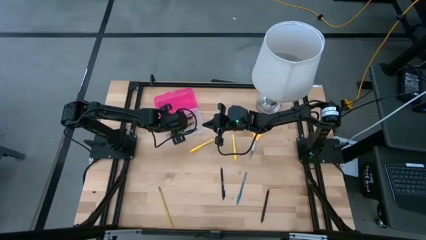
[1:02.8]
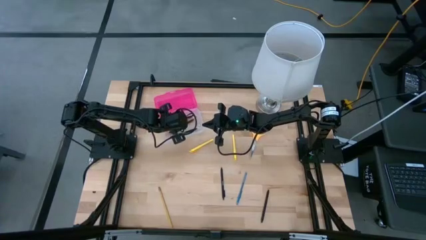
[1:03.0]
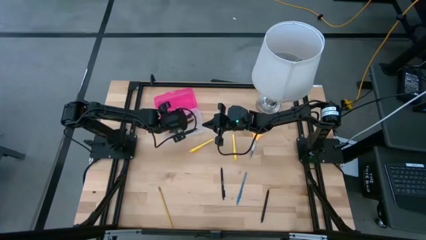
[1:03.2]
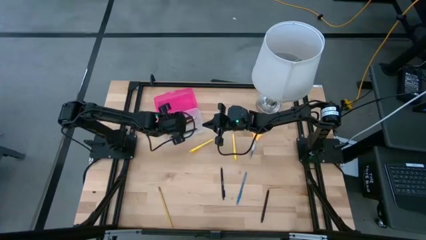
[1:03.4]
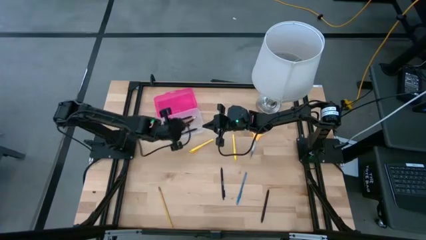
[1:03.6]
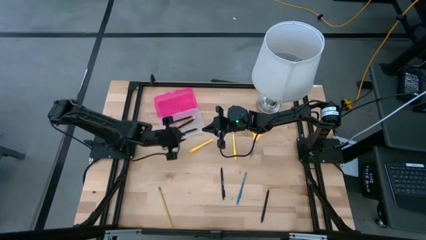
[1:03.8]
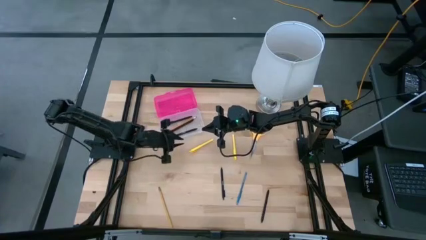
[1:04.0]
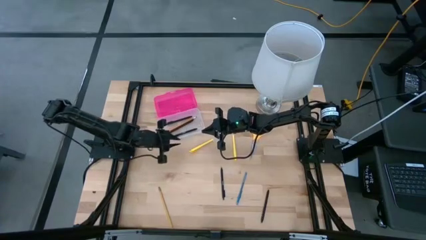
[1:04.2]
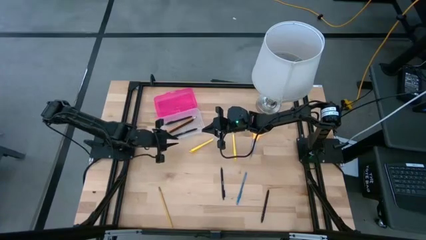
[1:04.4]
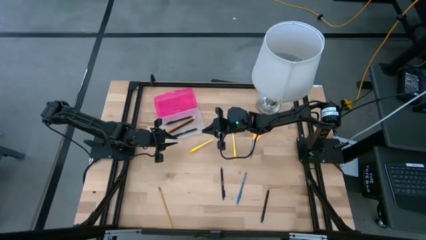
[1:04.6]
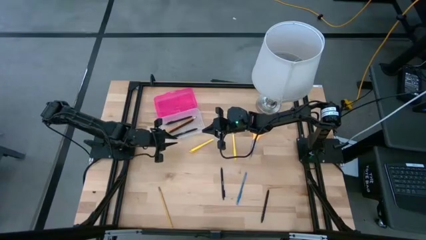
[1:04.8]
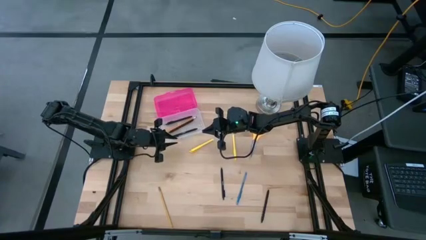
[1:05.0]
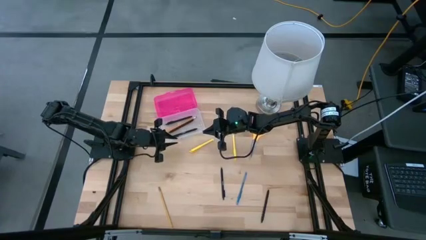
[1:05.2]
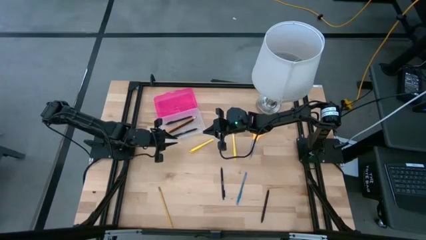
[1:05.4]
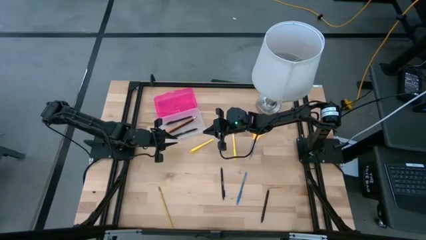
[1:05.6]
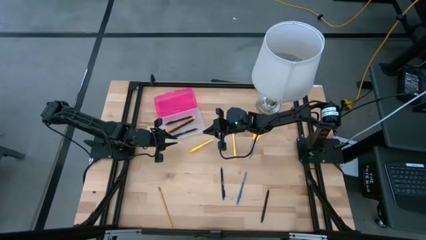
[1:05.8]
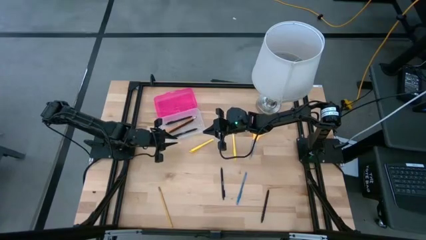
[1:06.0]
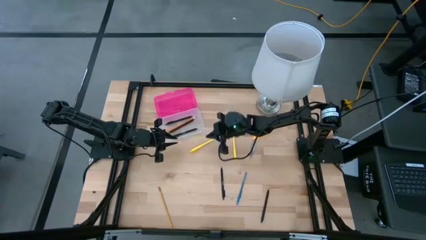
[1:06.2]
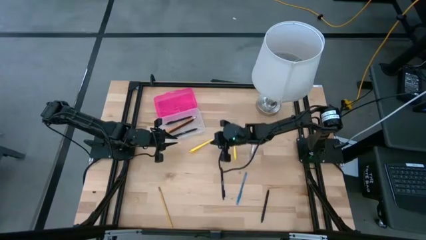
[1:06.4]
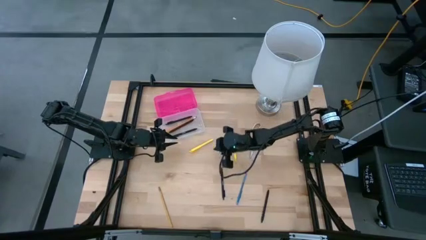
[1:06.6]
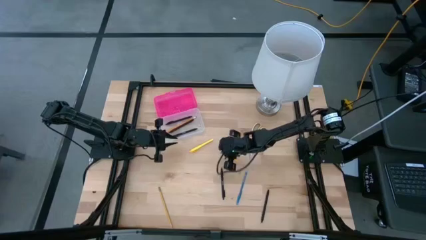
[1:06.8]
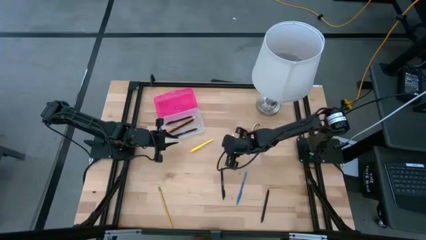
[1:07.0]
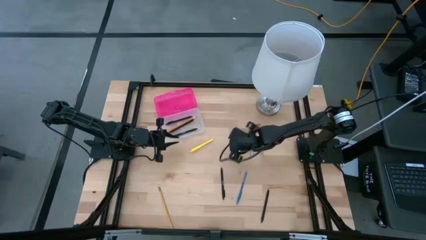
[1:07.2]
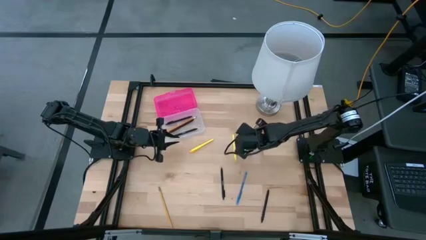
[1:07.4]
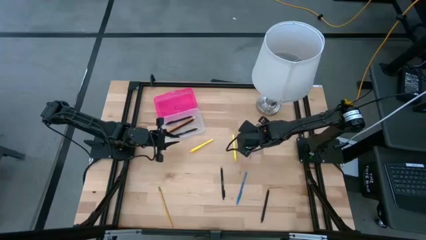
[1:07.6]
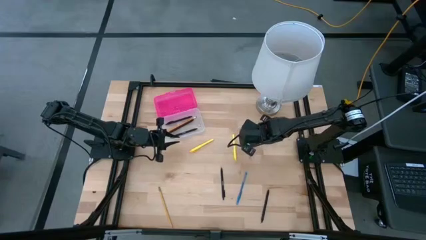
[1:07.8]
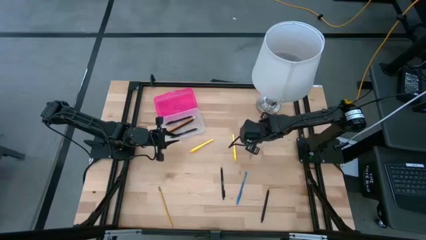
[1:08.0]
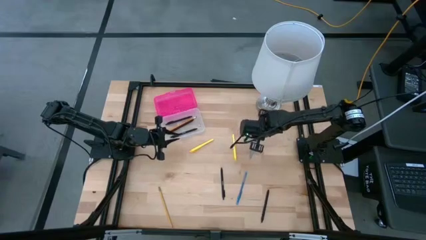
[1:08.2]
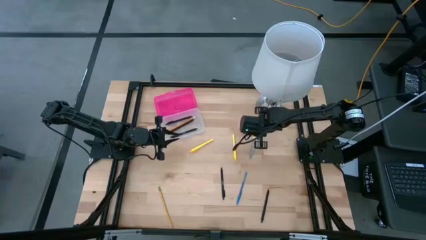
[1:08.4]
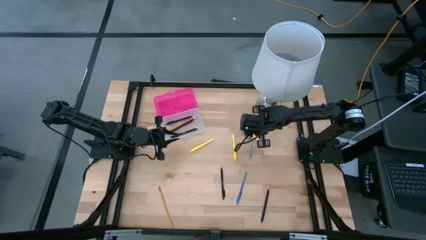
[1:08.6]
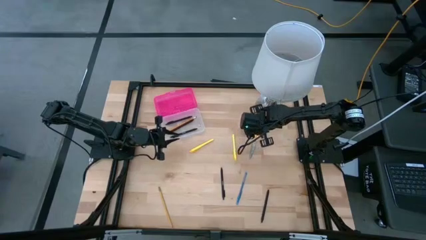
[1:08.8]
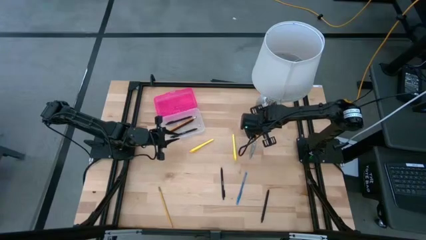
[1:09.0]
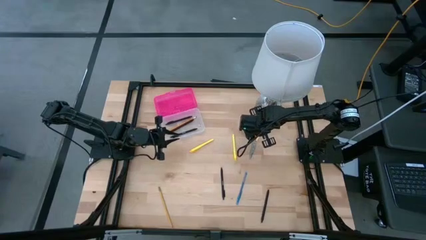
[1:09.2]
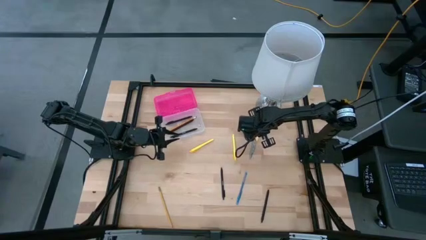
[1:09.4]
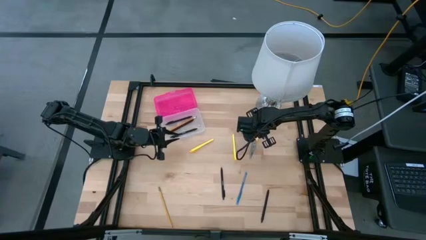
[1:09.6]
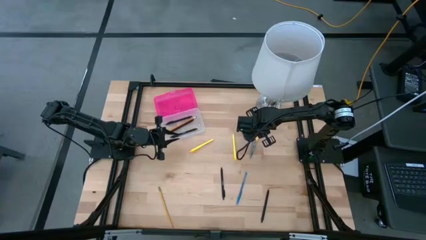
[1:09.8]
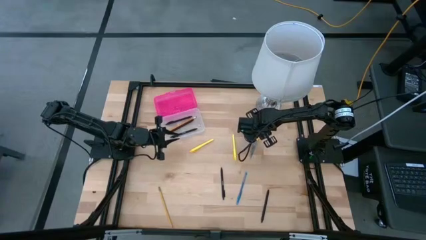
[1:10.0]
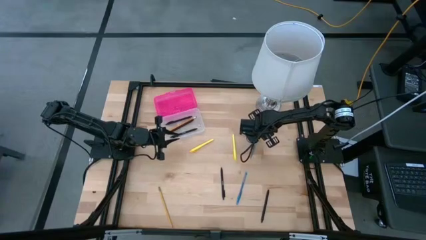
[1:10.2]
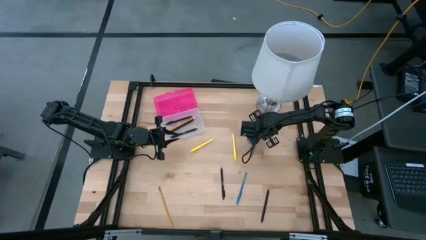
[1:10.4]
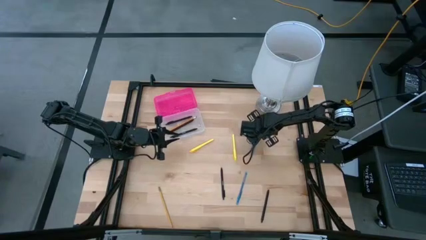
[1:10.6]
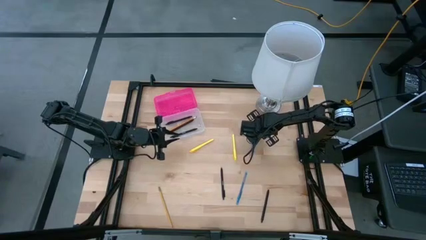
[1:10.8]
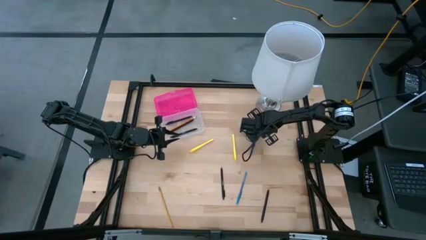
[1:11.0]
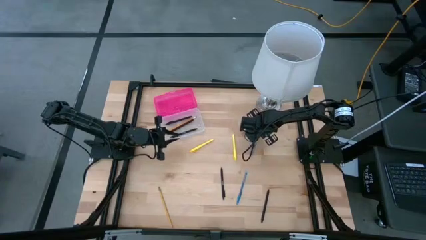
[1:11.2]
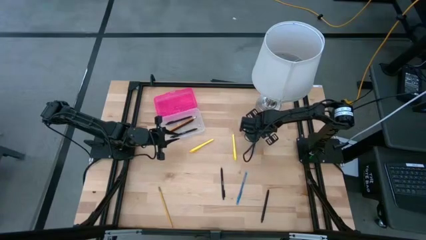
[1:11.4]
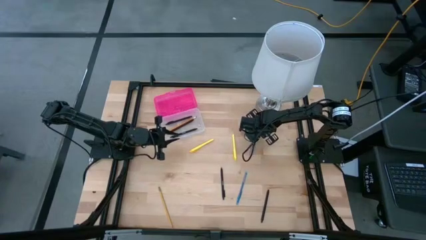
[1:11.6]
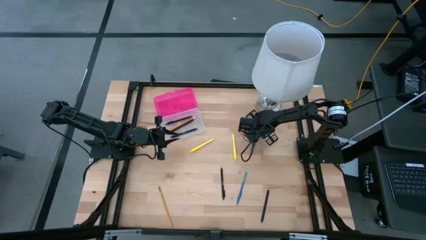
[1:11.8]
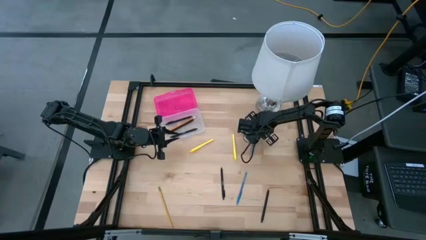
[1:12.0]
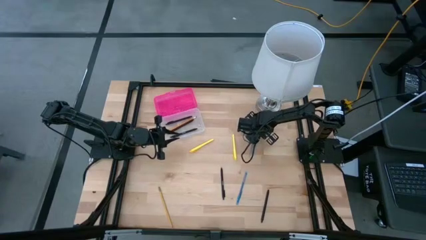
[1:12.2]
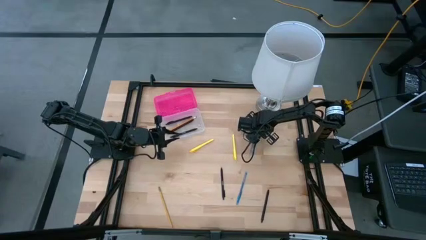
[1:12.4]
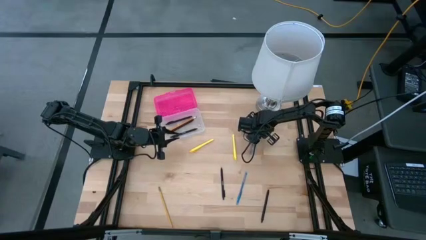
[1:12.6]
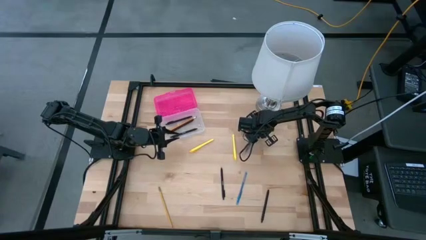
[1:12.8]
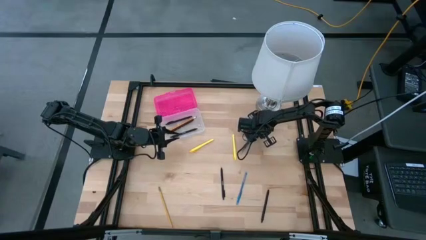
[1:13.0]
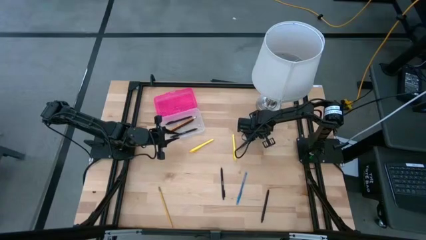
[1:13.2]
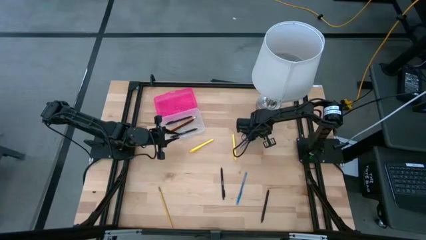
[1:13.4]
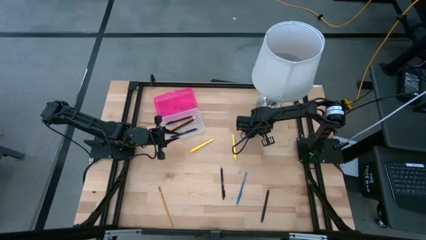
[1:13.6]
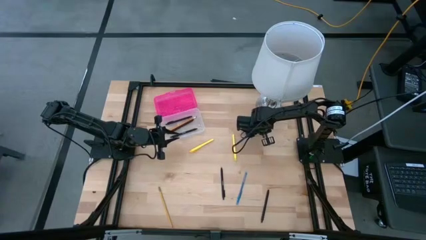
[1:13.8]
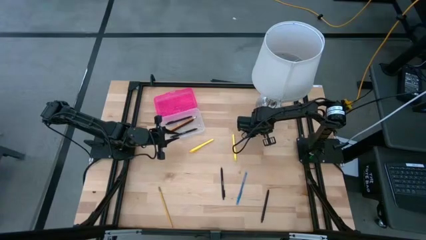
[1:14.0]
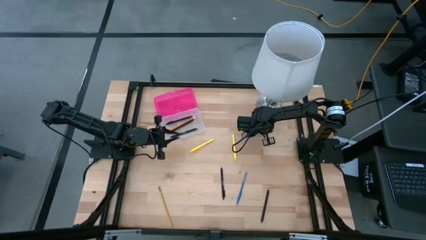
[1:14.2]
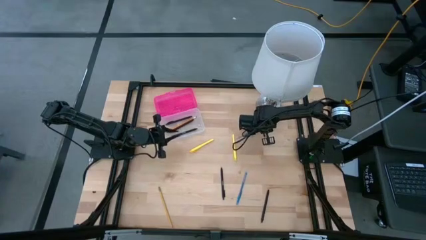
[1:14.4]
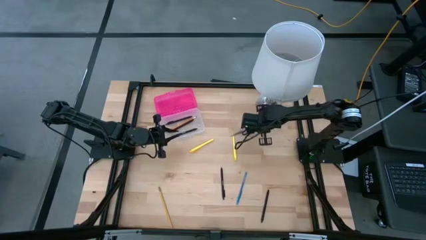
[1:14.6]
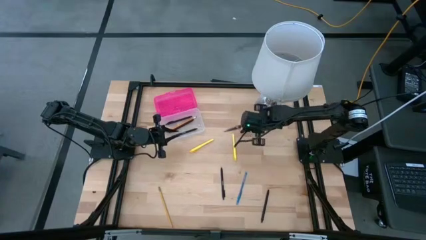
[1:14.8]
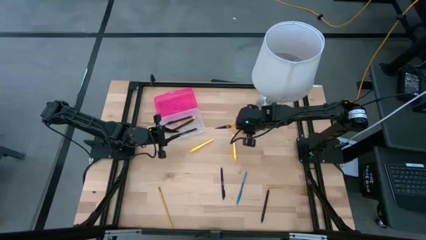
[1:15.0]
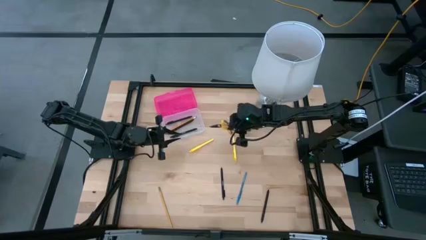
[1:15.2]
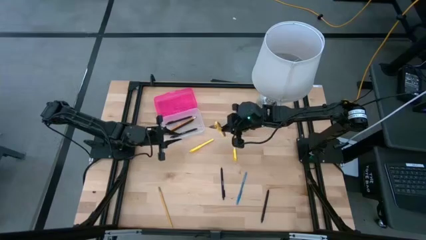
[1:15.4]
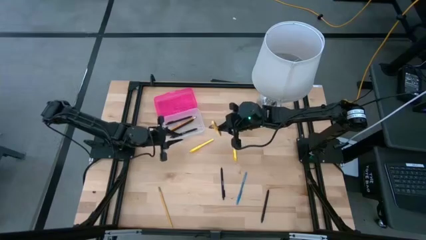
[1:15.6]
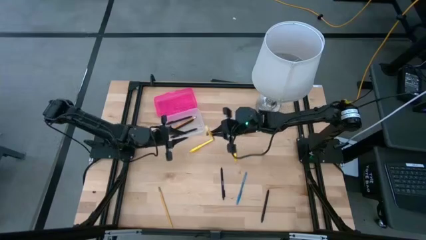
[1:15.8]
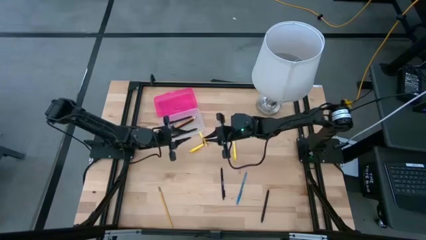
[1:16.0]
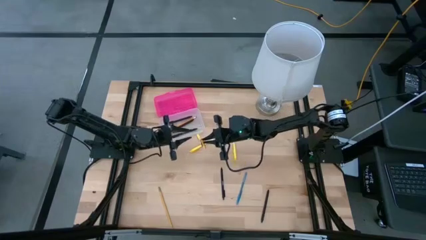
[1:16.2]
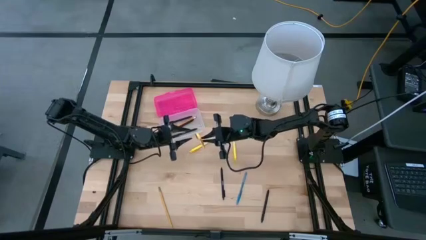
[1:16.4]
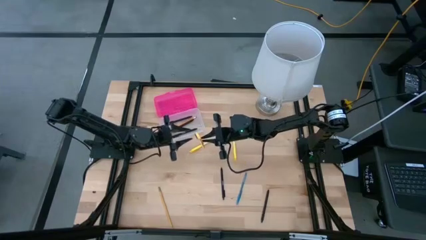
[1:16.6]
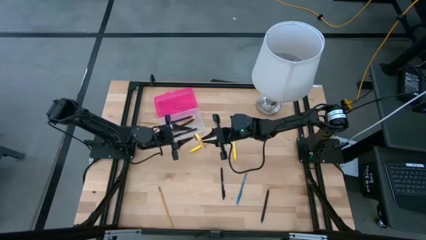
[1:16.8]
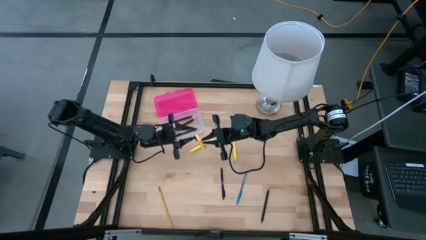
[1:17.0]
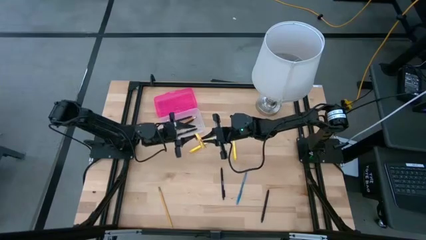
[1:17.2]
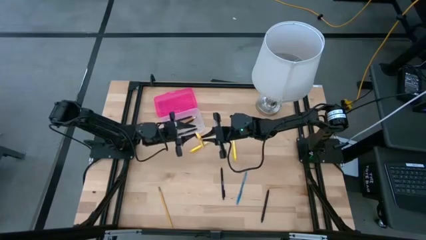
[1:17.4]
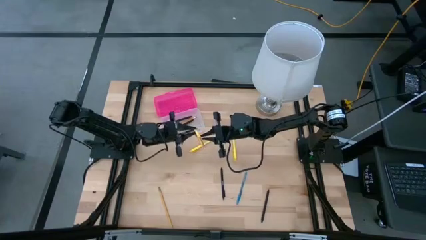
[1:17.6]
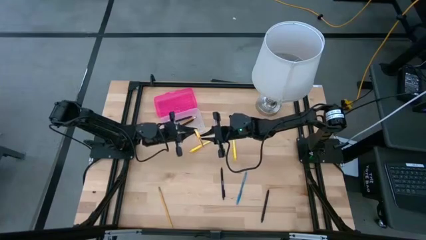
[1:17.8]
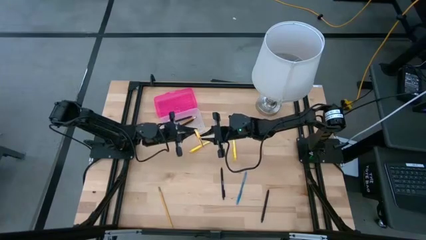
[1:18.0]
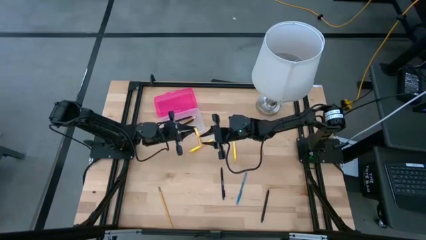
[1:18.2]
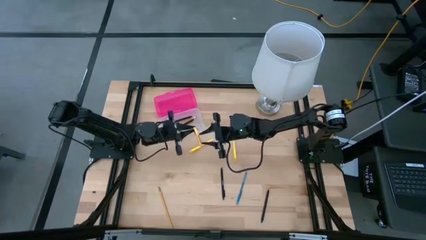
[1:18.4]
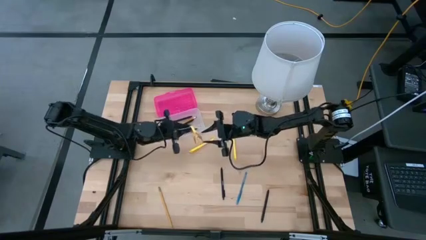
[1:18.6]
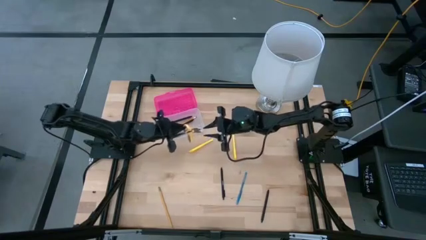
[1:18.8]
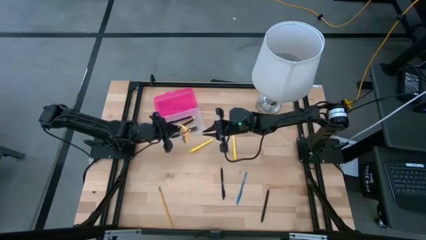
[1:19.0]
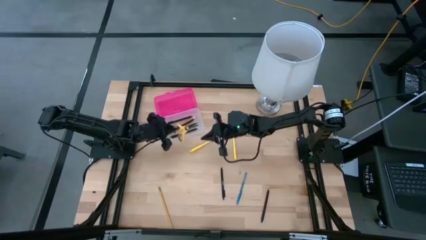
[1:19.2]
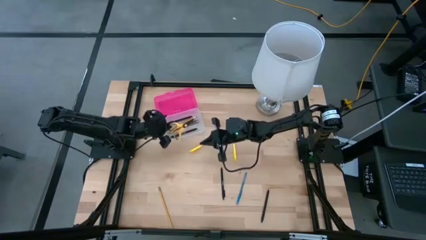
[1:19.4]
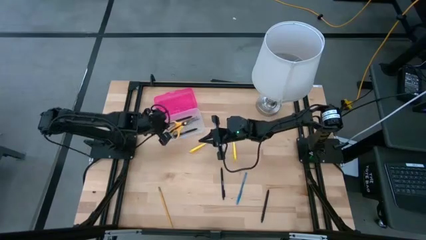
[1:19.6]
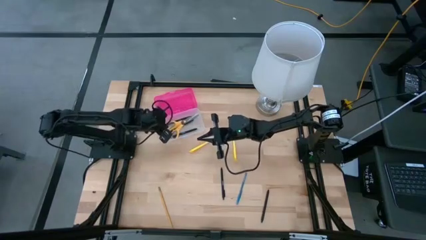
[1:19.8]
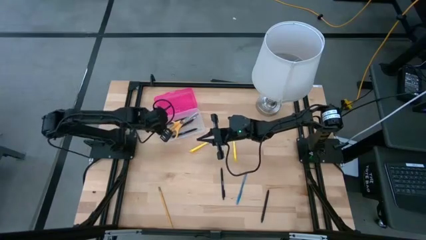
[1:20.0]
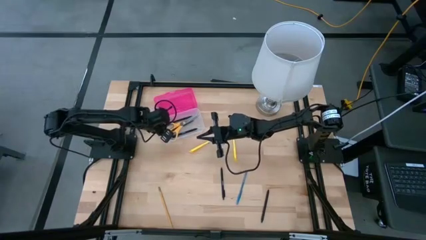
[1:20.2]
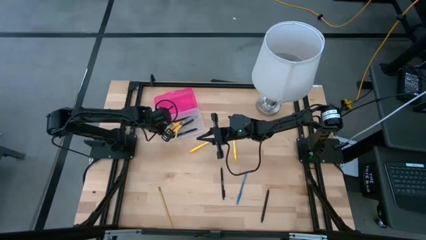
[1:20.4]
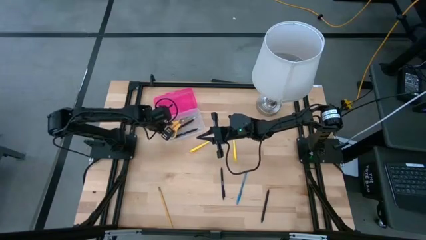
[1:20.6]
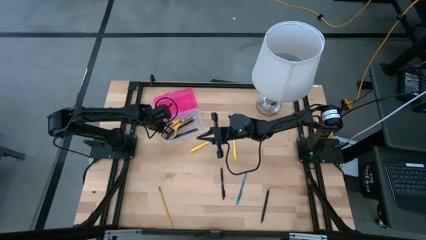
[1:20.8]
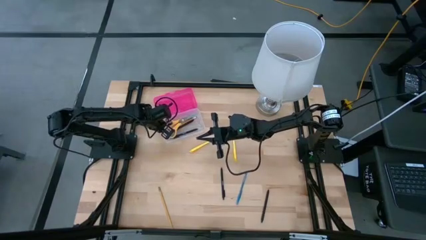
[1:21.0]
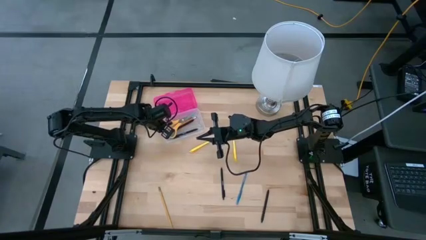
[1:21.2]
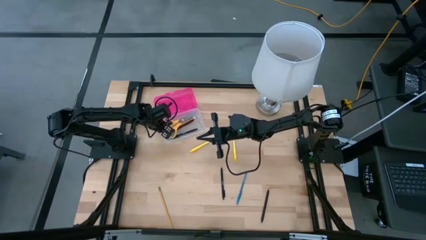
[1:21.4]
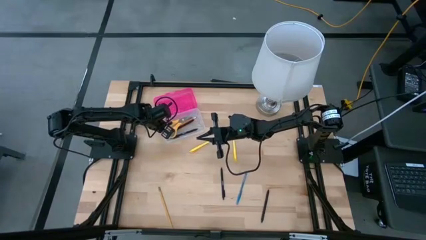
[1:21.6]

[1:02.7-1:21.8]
Task: Pick & place school supplies into a supply box
Put the yellow scissors into the pink supply box
